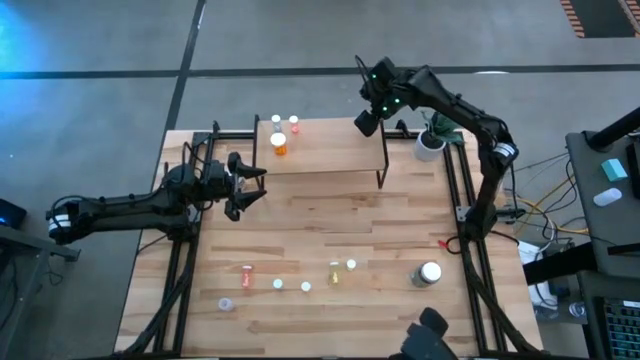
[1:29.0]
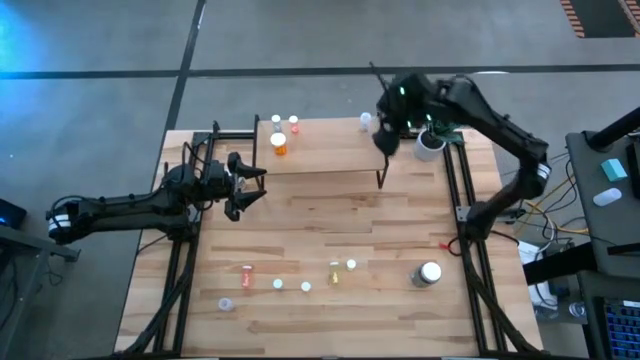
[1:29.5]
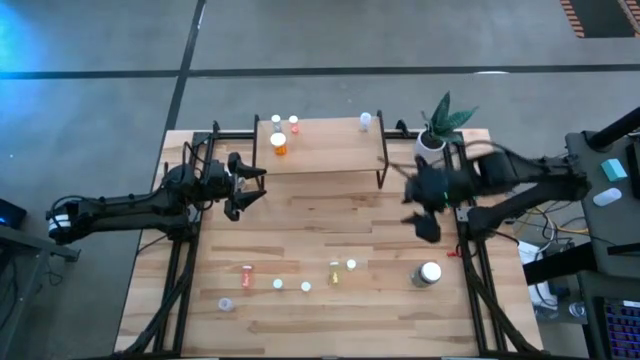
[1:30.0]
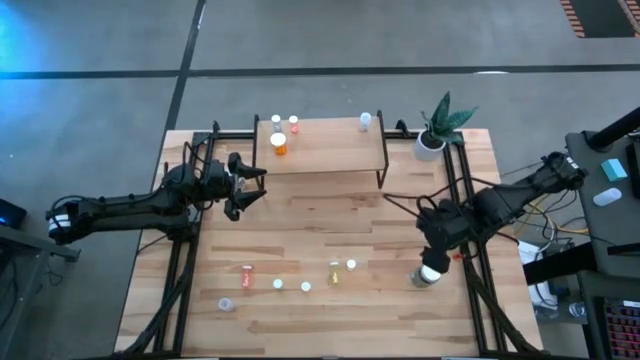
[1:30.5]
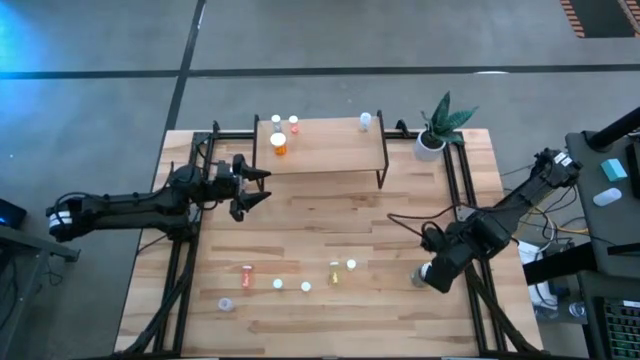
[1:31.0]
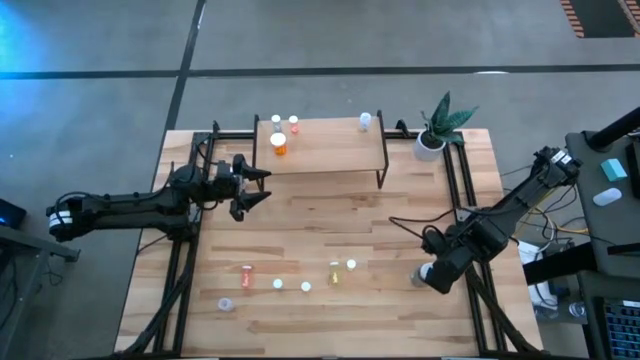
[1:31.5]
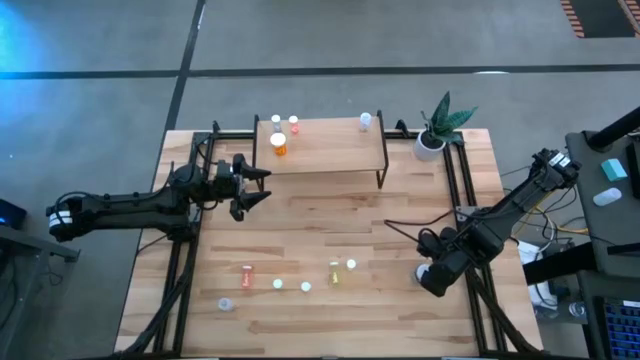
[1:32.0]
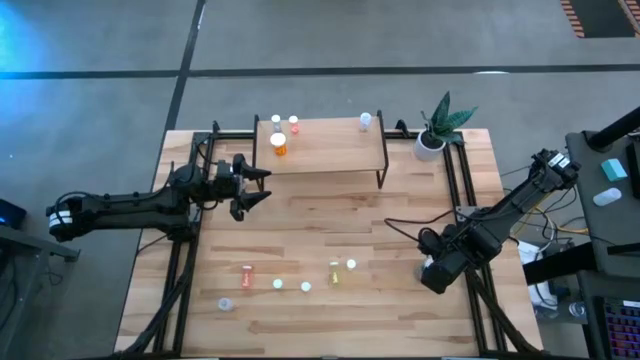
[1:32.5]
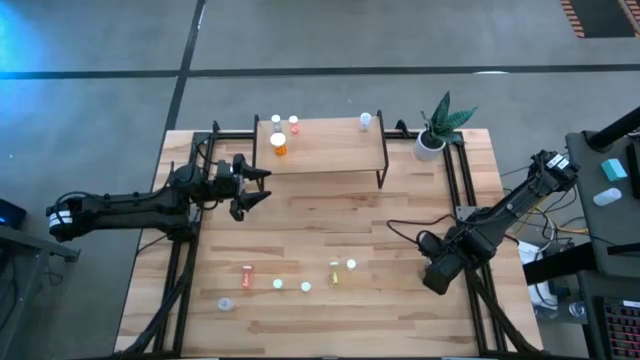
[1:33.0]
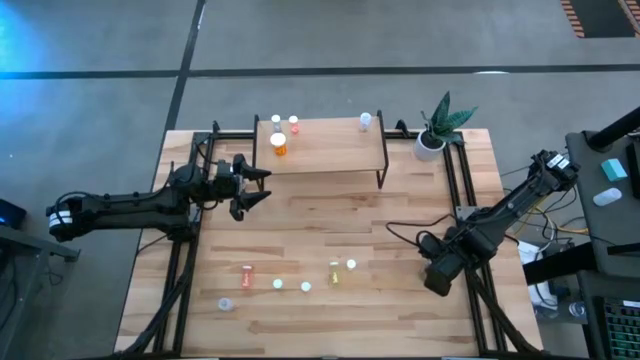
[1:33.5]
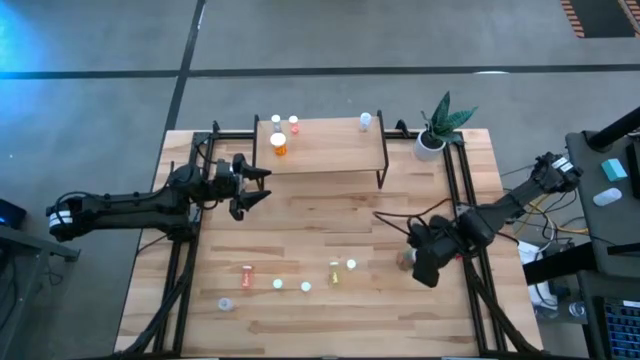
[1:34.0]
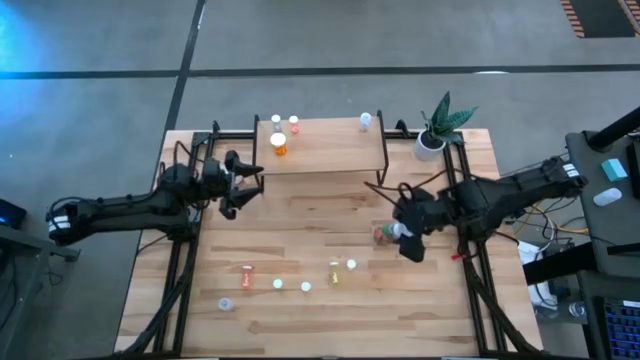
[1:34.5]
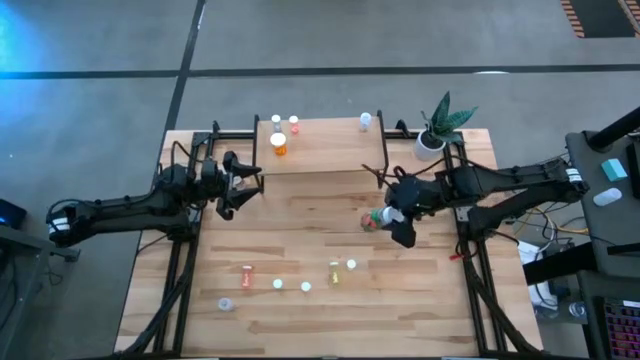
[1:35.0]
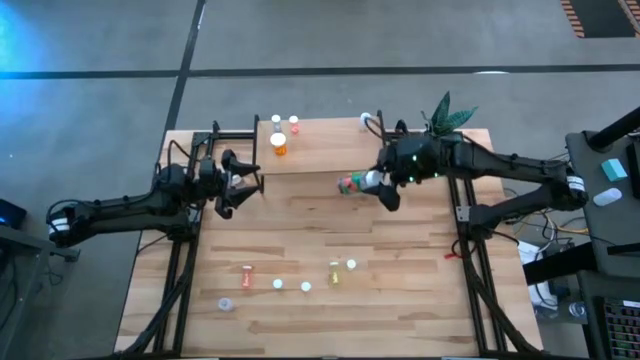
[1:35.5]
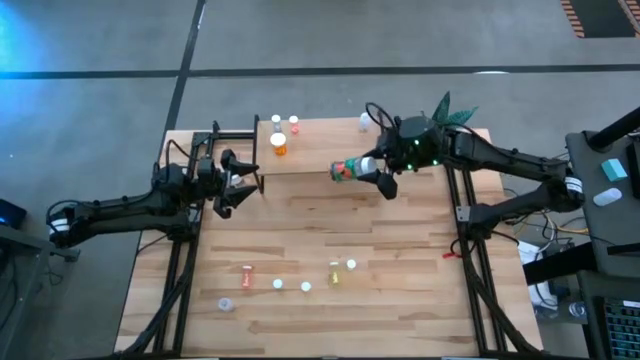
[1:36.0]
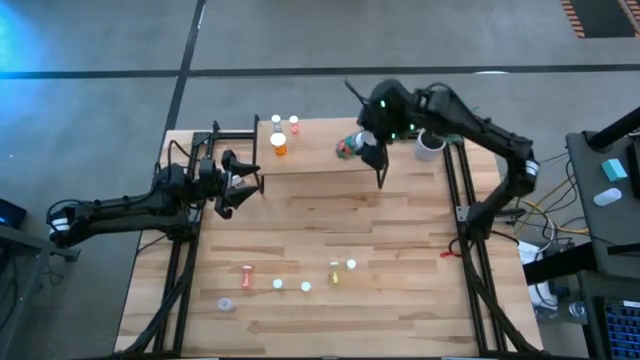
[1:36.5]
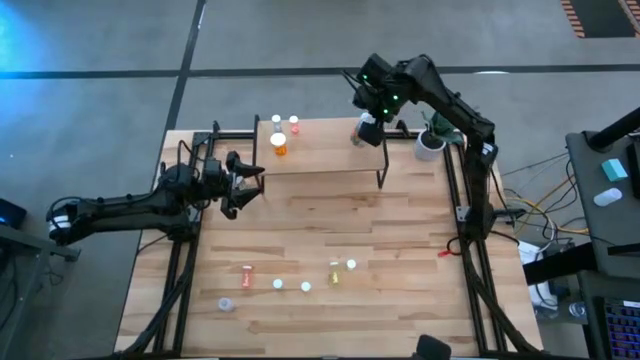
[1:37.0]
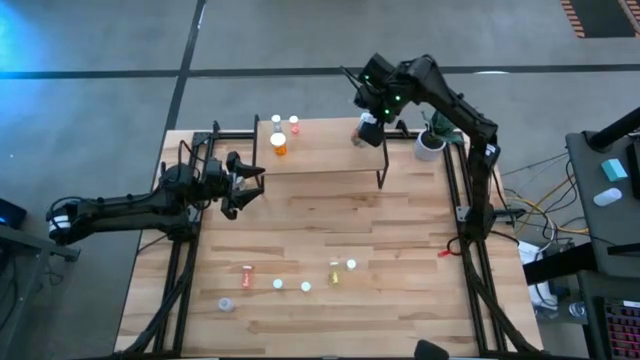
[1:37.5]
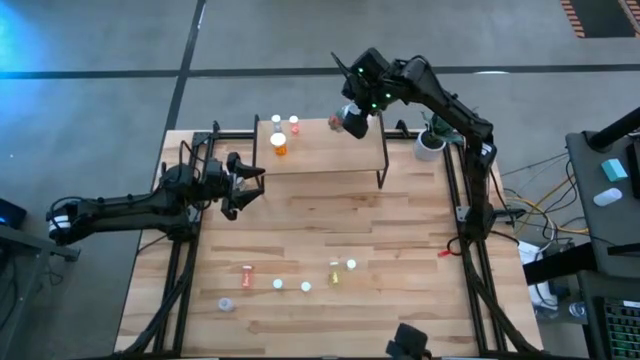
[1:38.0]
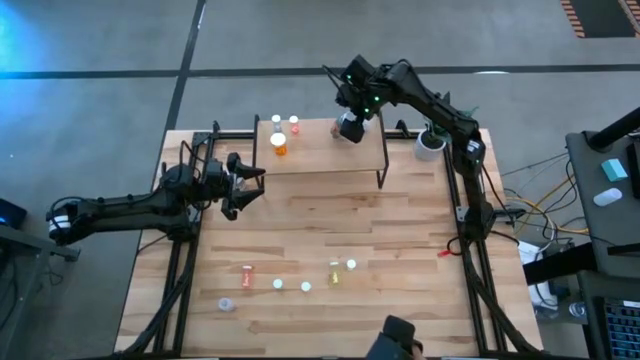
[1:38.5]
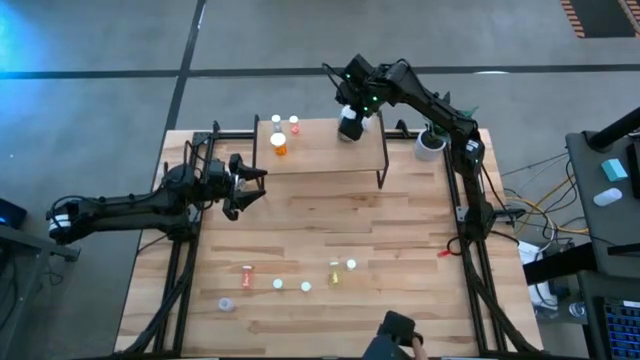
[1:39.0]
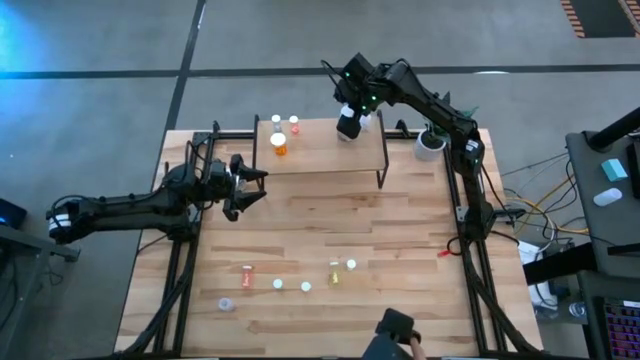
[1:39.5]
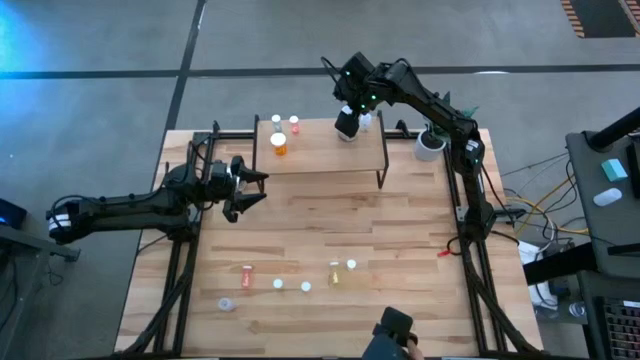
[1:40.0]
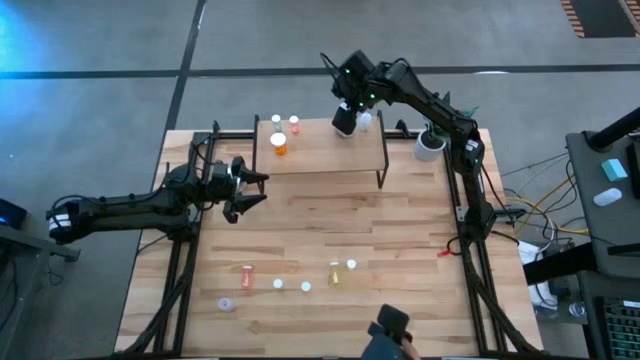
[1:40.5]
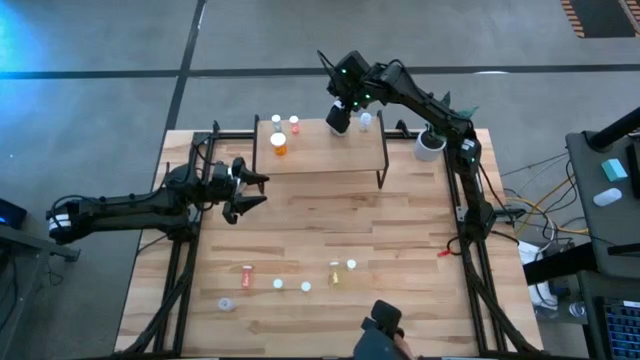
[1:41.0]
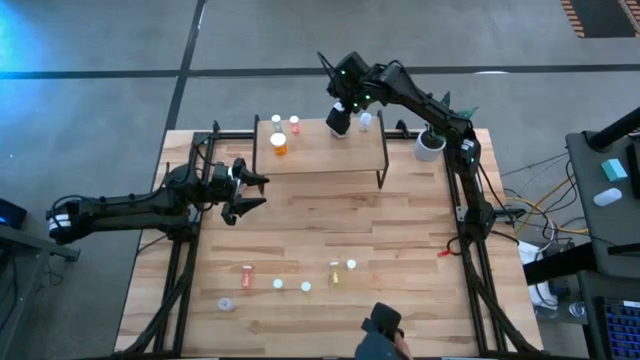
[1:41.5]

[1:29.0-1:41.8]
Task: Pick and place medicine bottles onto shelf by color
Put the green medicine bottle on the shelf

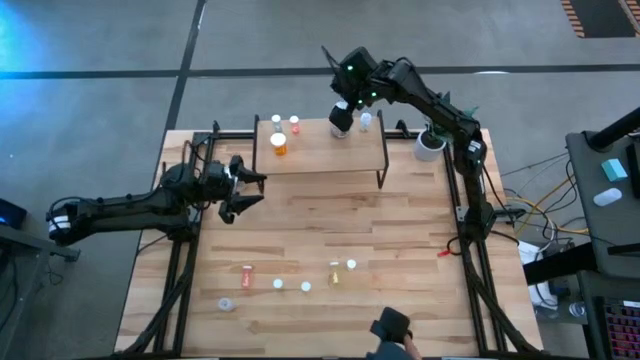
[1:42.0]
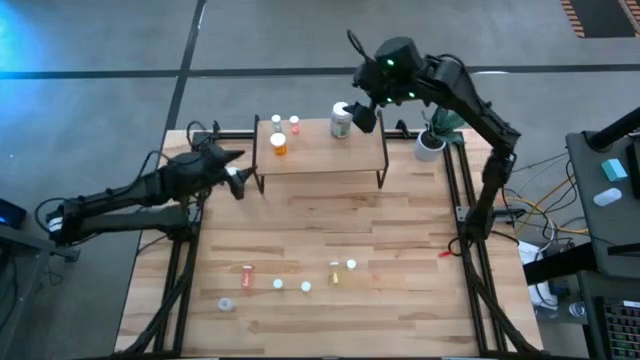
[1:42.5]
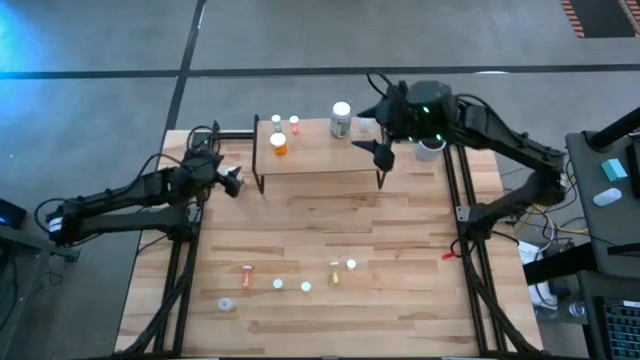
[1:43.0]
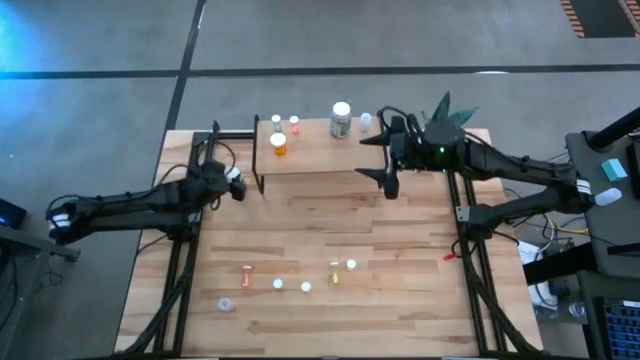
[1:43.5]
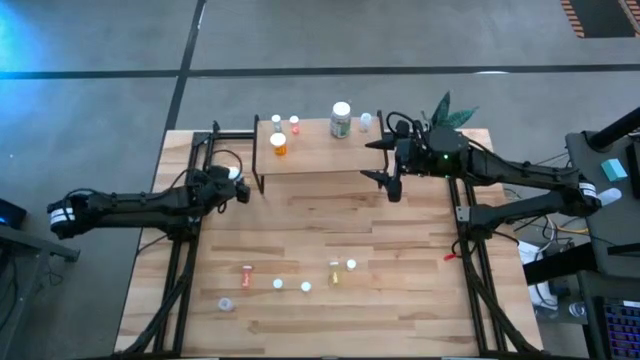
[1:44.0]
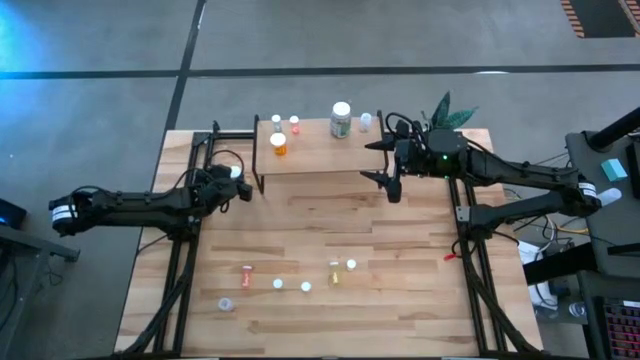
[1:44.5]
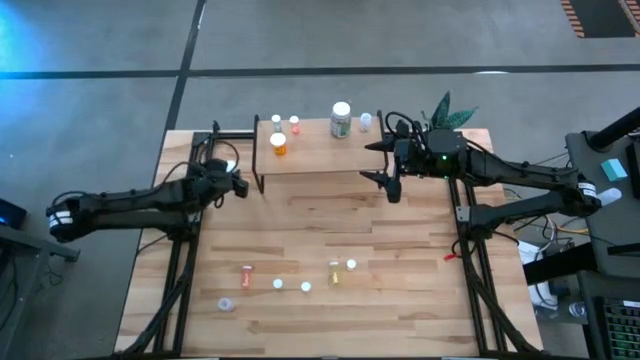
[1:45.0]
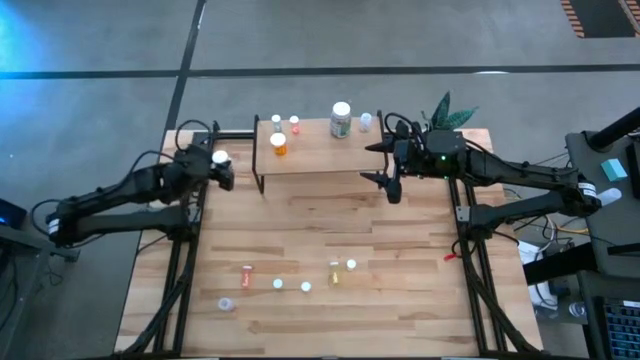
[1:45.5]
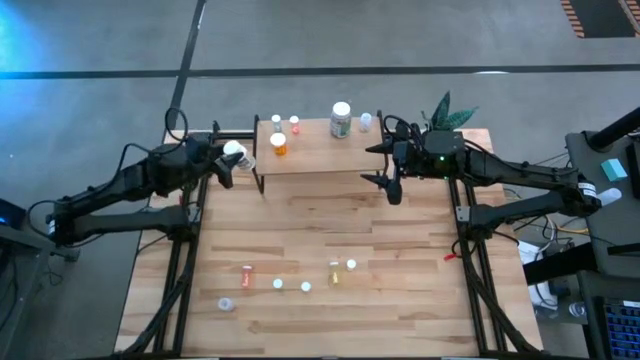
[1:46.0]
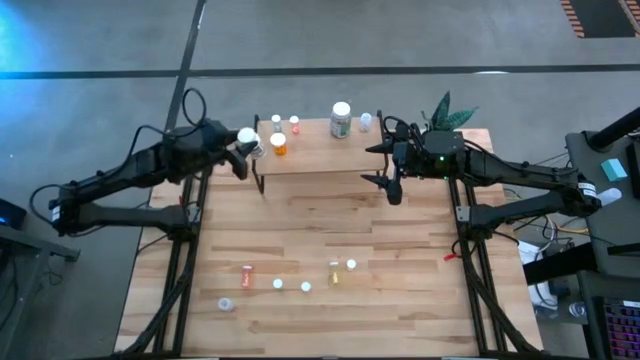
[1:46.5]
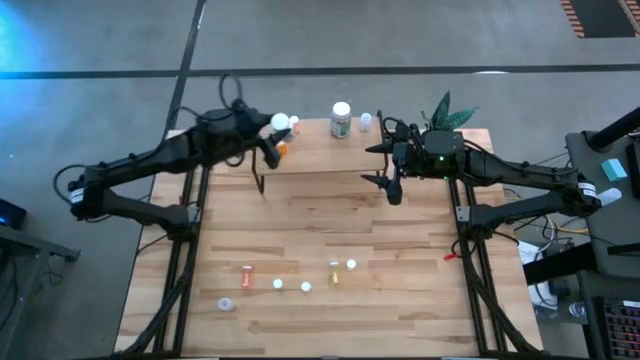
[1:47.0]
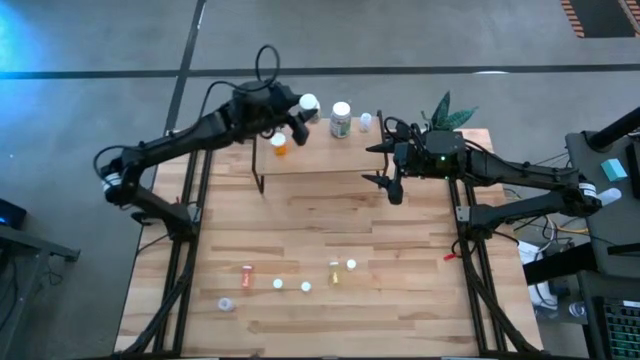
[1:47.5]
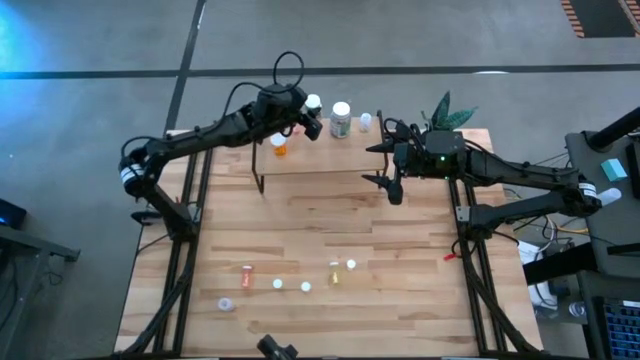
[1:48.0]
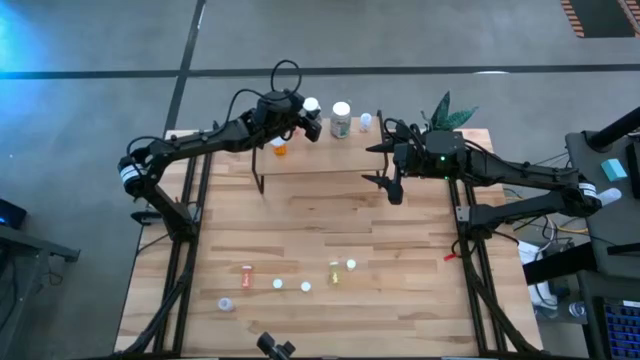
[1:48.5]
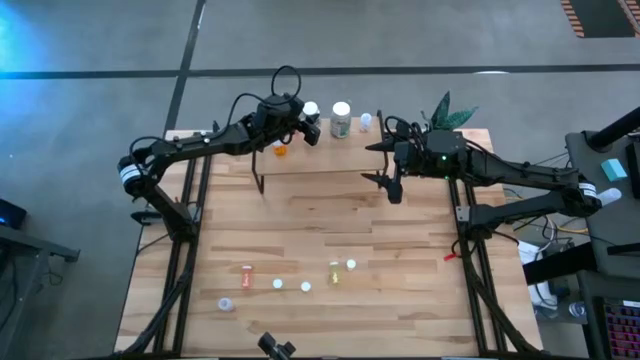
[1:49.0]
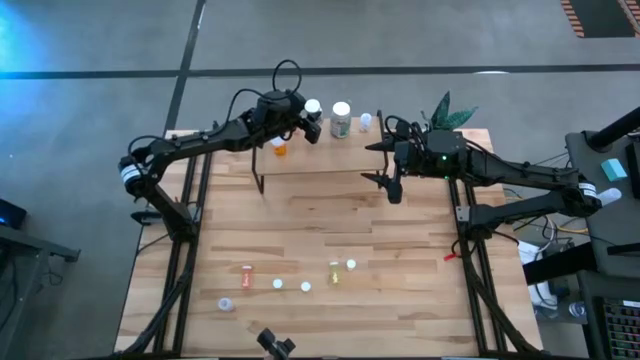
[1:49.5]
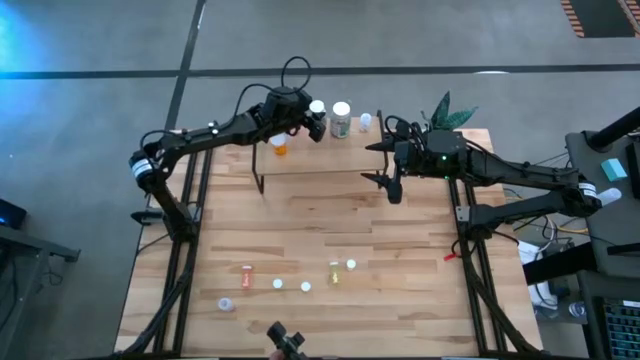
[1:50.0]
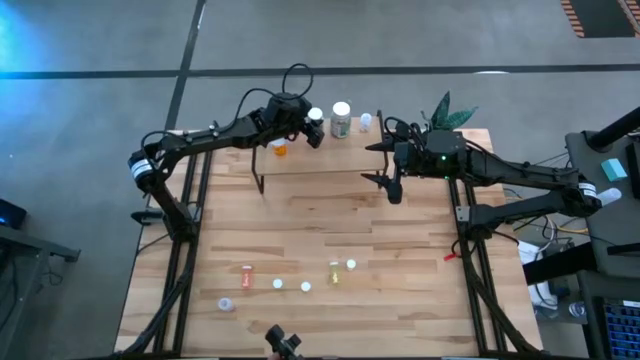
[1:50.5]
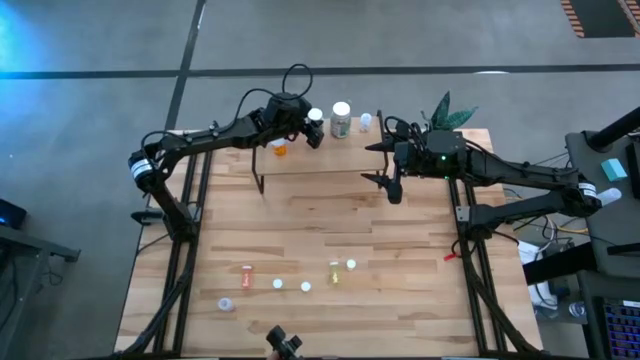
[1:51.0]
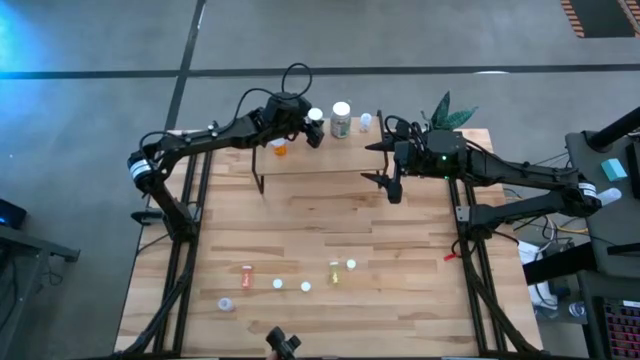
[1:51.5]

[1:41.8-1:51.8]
Put the white medicine bottle on the shelf
